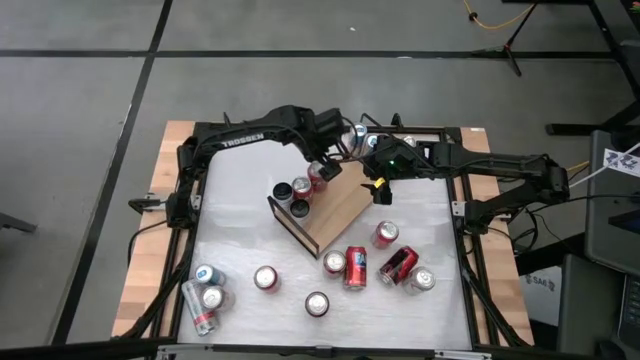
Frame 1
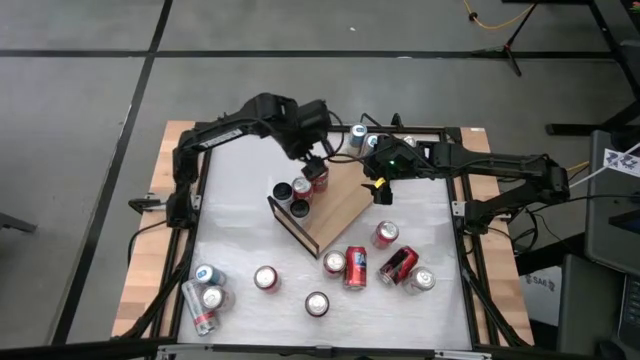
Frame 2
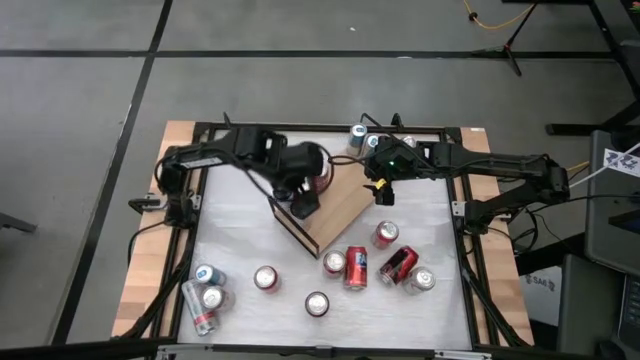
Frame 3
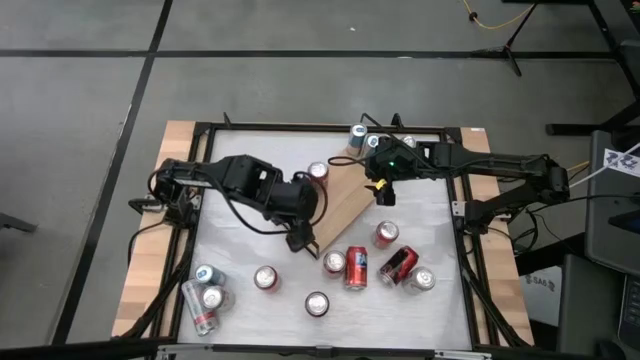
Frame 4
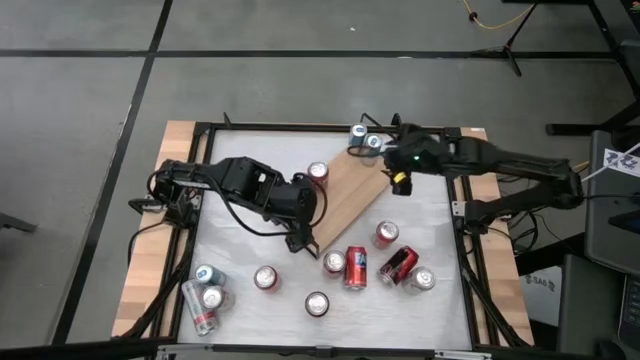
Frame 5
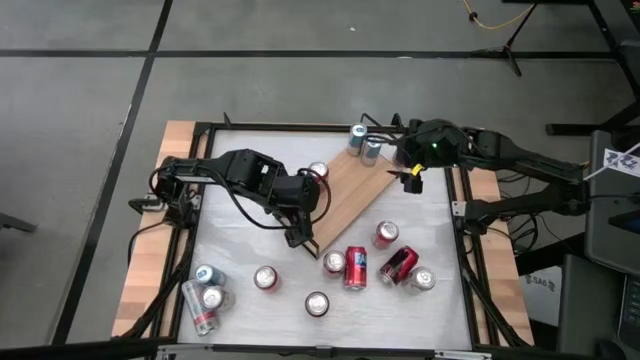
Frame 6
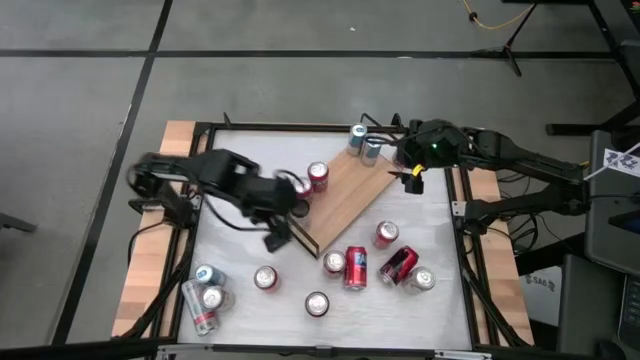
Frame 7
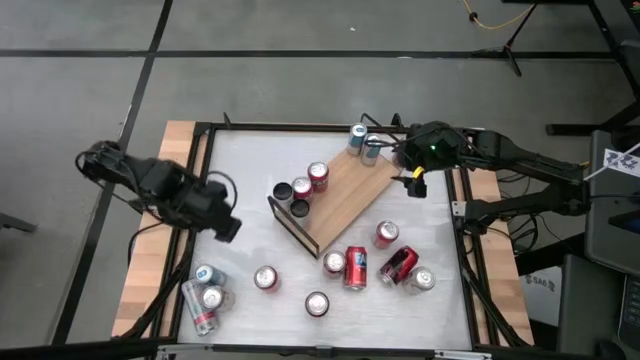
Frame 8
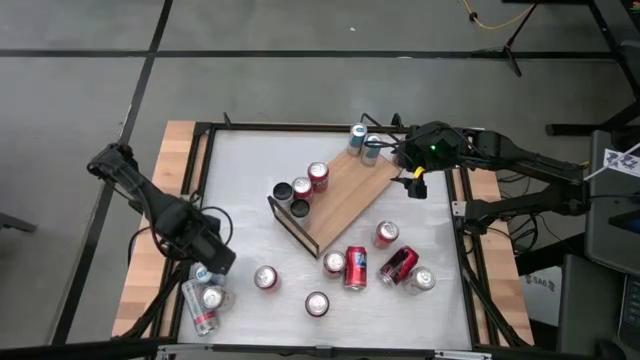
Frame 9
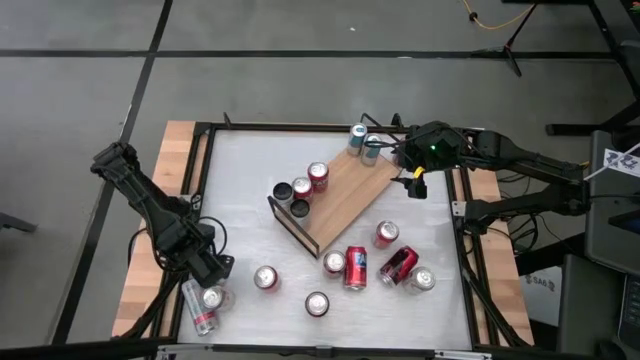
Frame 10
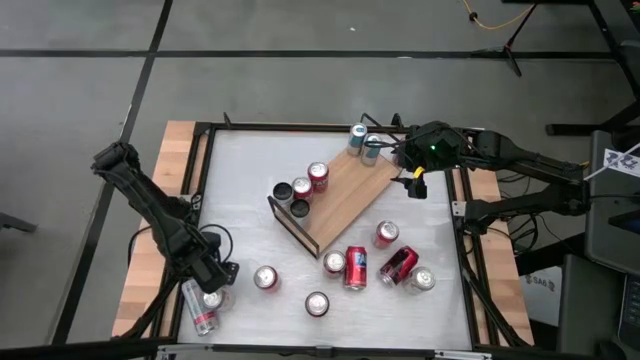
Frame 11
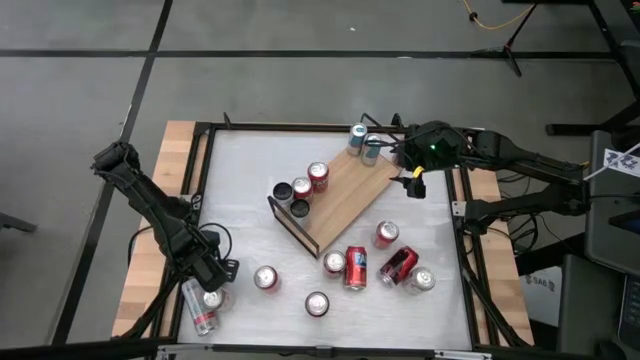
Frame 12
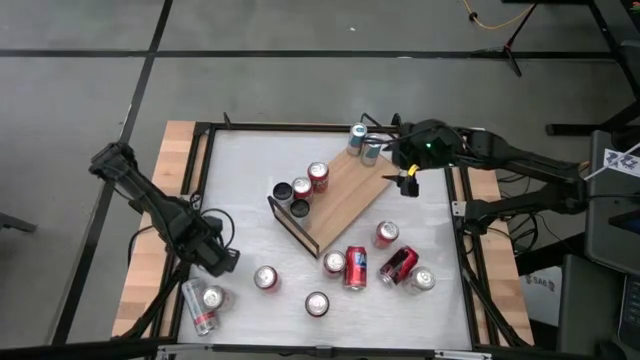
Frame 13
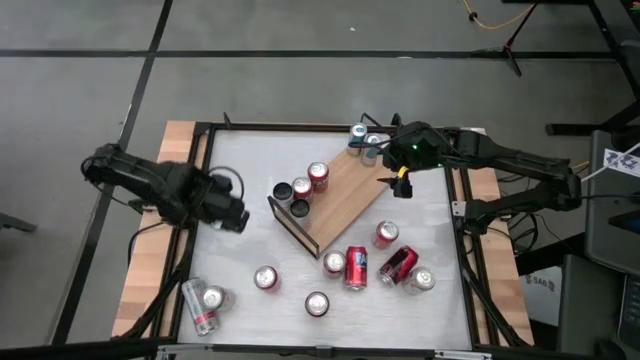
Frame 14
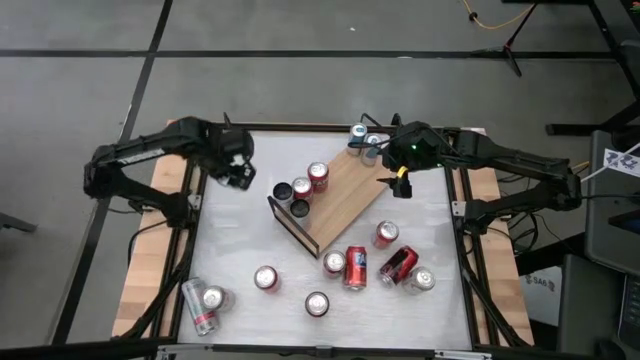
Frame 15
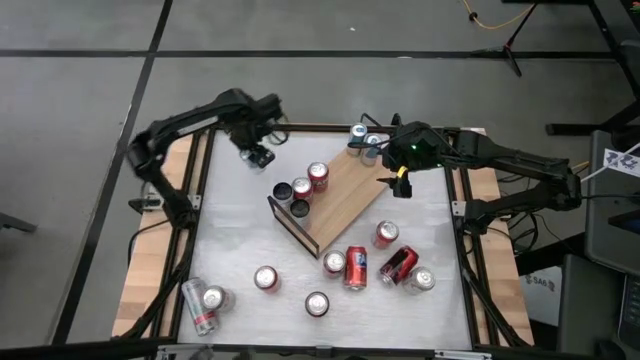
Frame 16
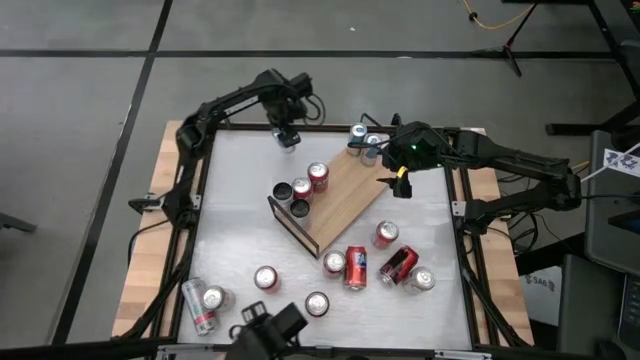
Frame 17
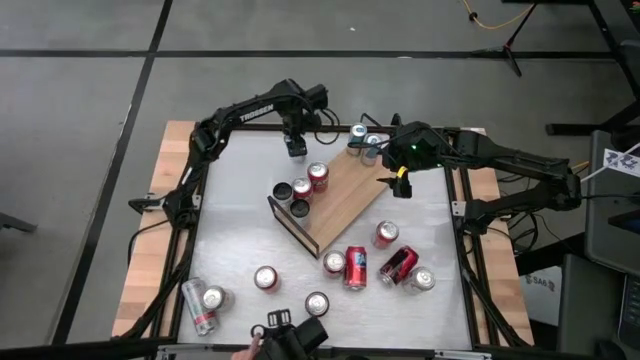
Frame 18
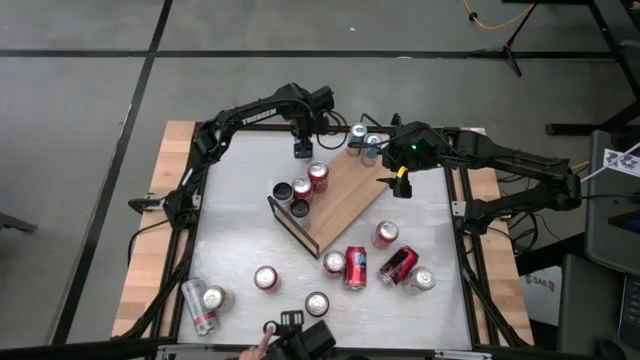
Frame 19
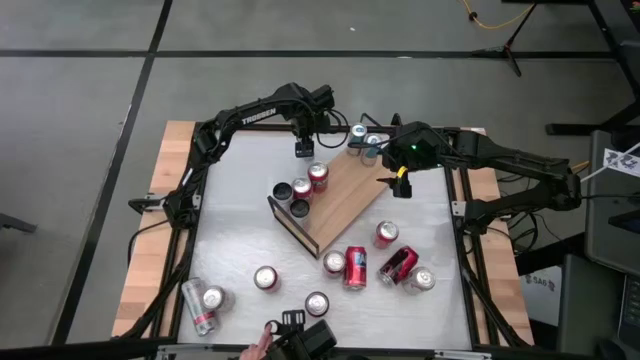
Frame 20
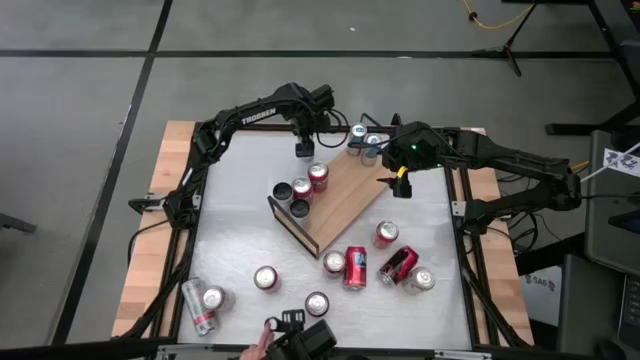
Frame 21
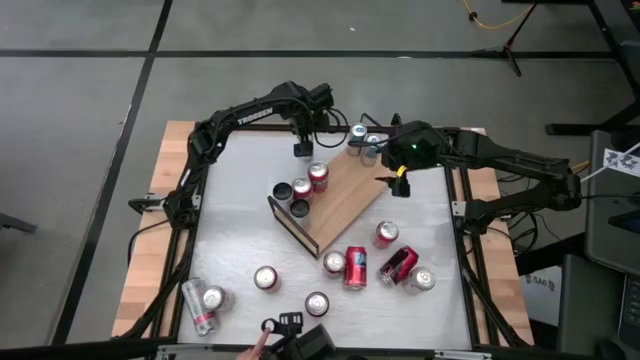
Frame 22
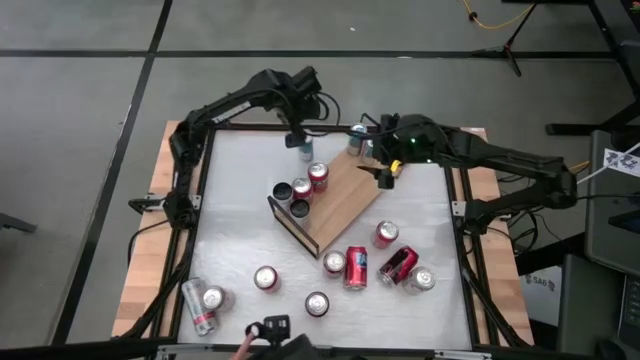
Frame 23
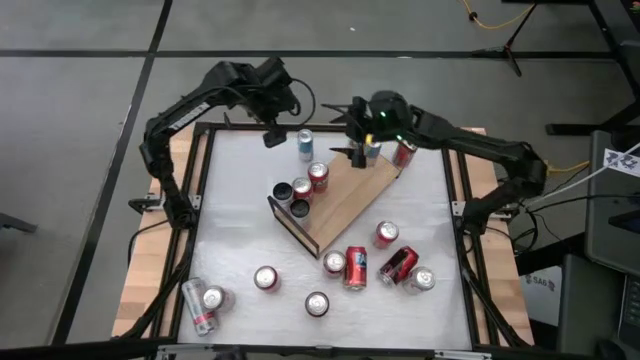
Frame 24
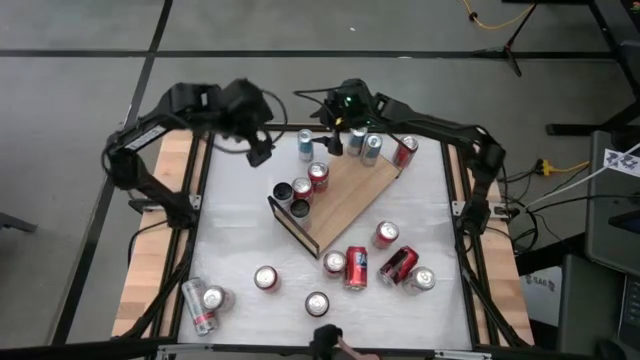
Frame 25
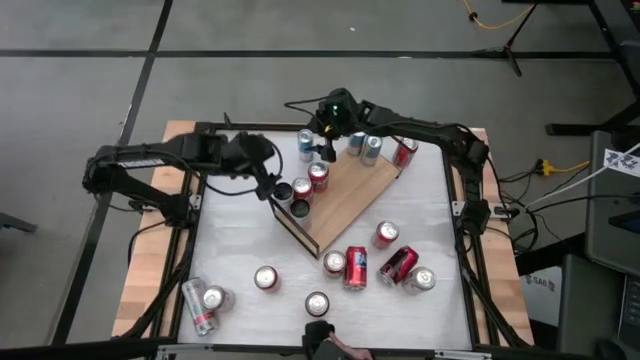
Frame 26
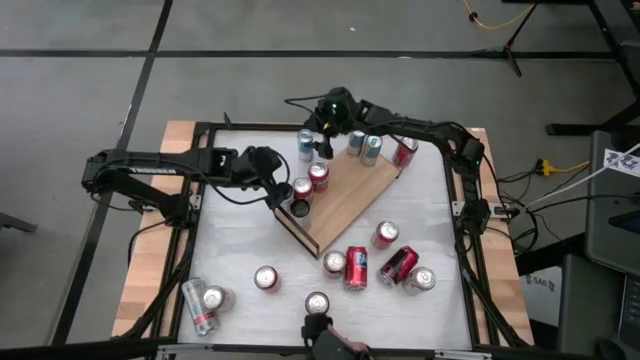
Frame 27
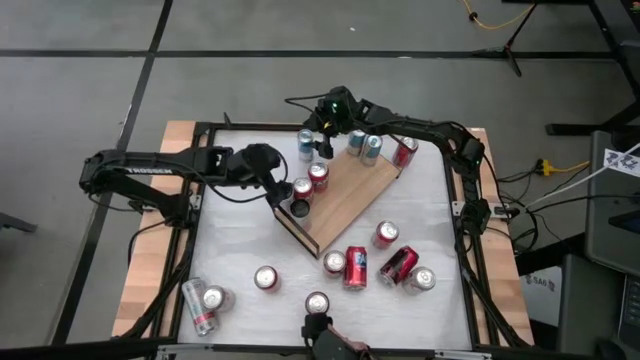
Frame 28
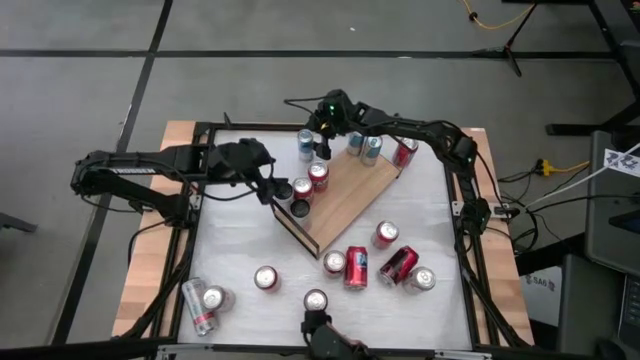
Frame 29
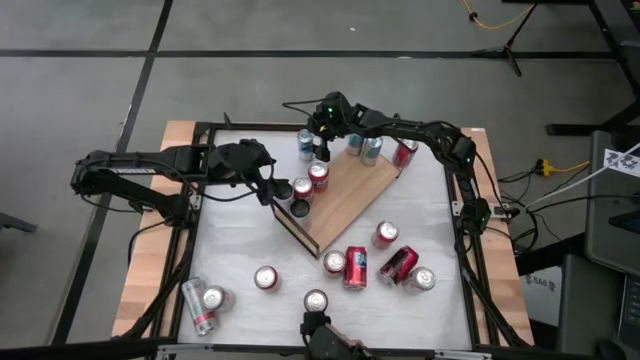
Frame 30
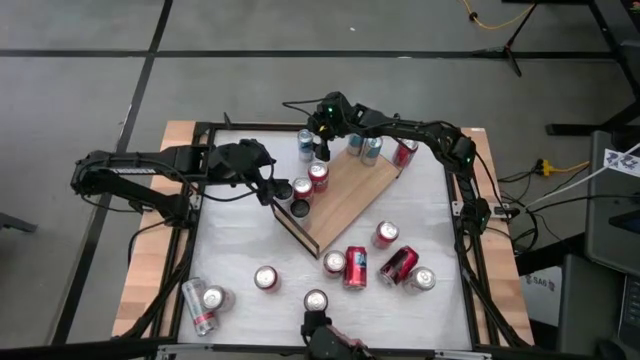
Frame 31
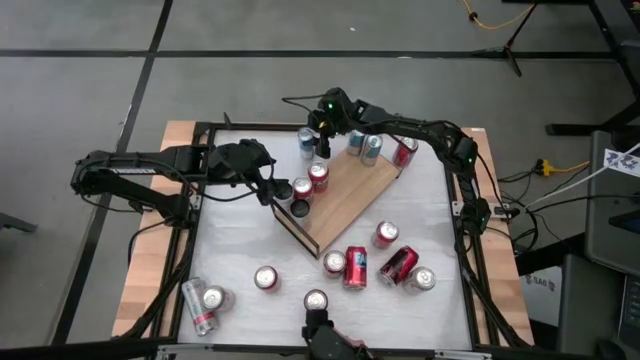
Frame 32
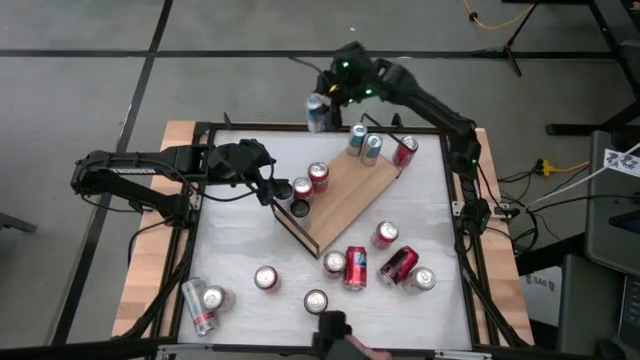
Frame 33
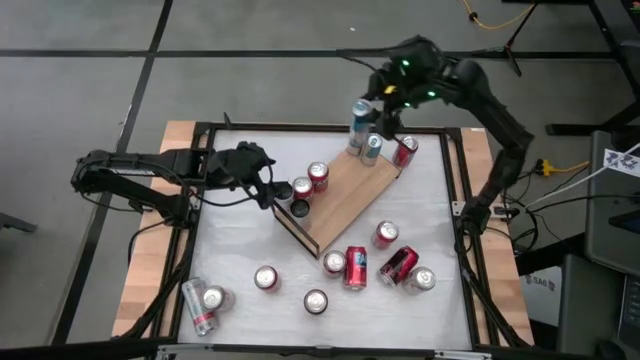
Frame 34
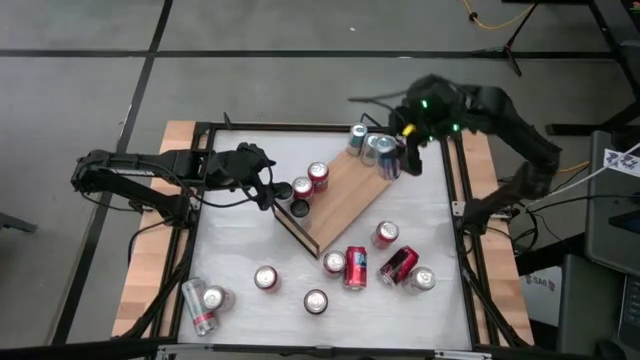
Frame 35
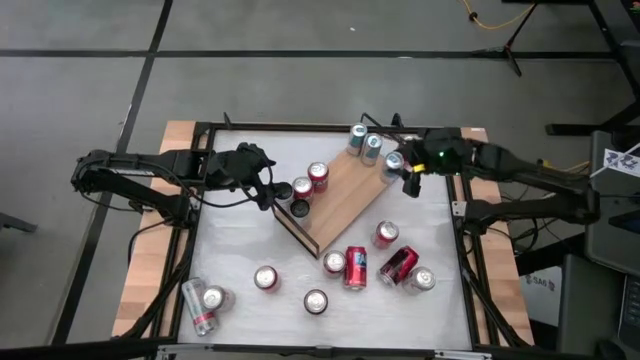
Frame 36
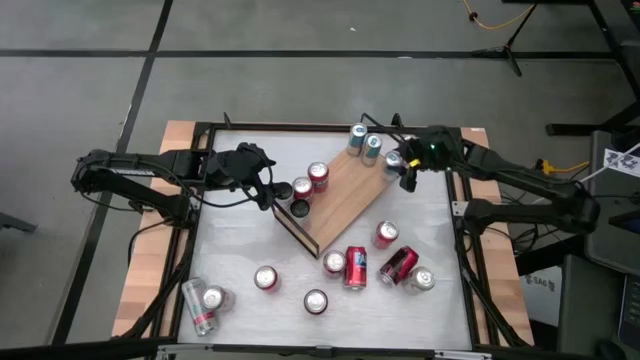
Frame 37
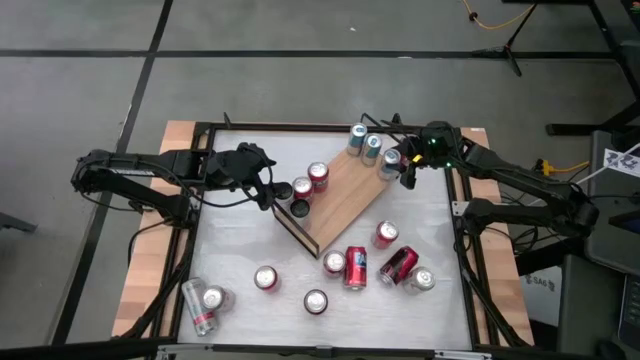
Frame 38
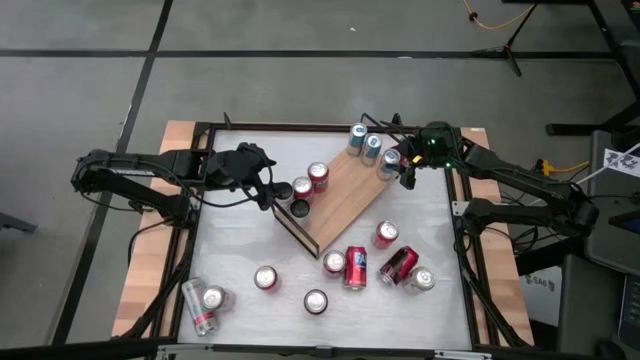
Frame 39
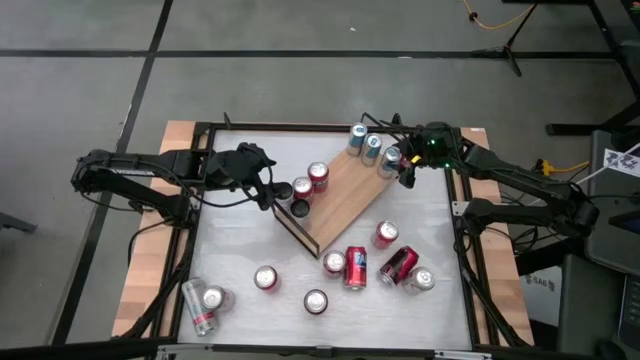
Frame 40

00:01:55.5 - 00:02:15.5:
Task: Place canned beverage on shelf
Put the blue soda can on the shelf aligned with the other blue soda cans

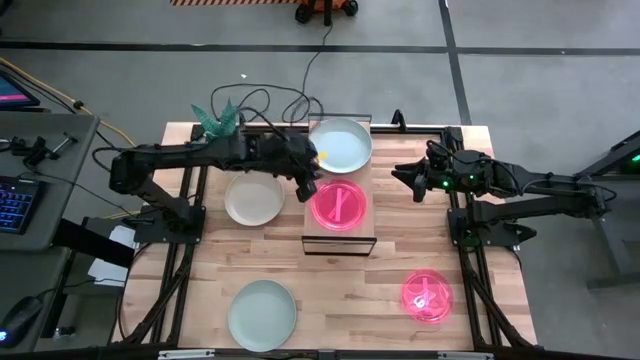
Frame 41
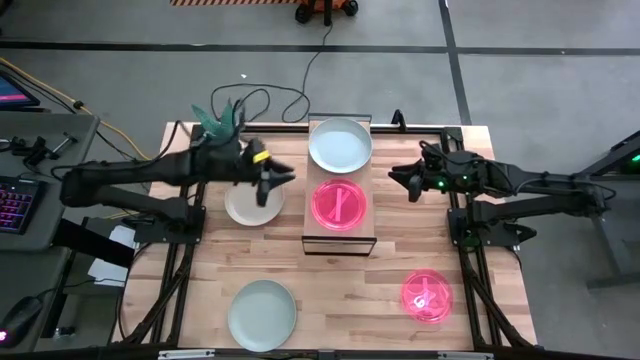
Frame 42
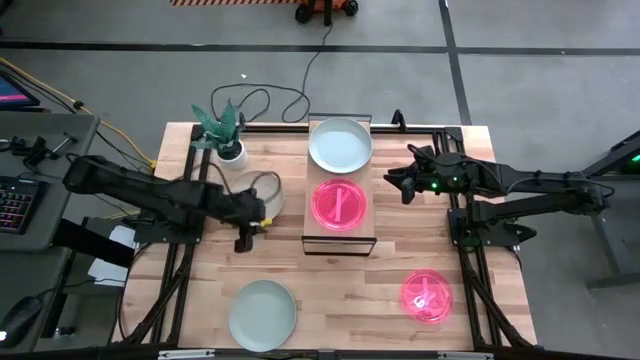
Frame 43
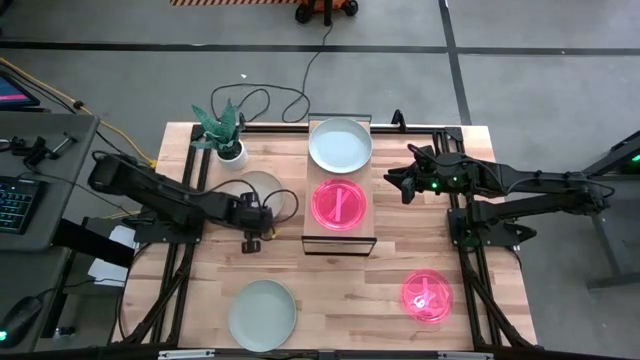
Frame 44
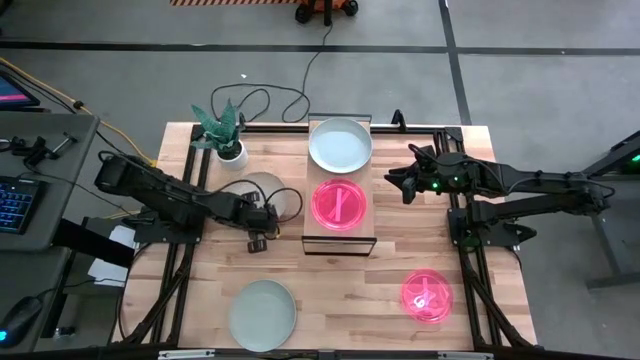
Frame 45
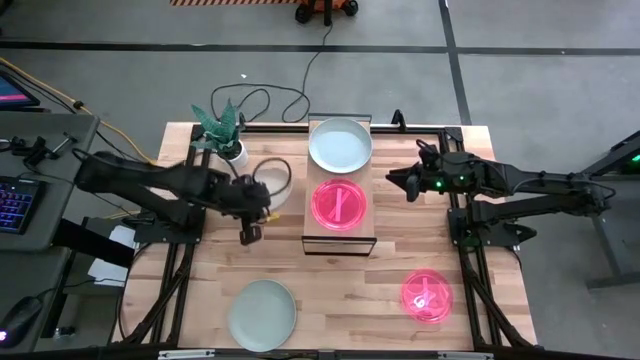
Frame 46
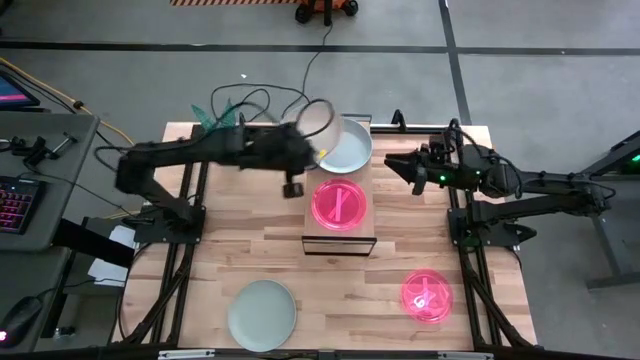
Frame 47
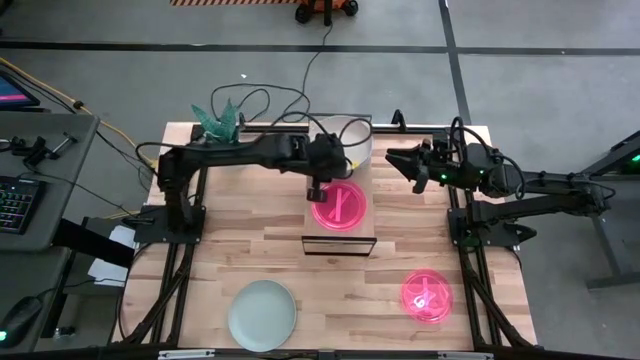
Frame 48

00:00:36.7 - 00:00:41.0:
Task: Place and stack plates onto a shelf
Stack the off white plate on top of the white plate on the shelf
